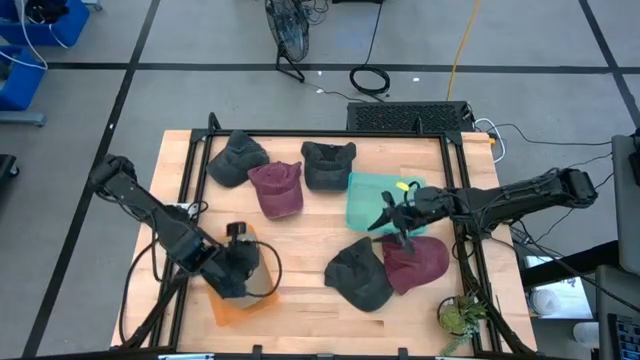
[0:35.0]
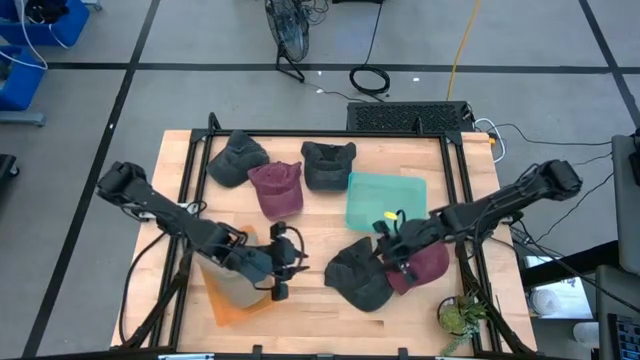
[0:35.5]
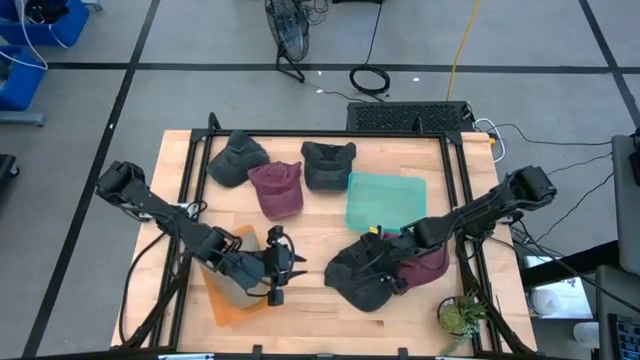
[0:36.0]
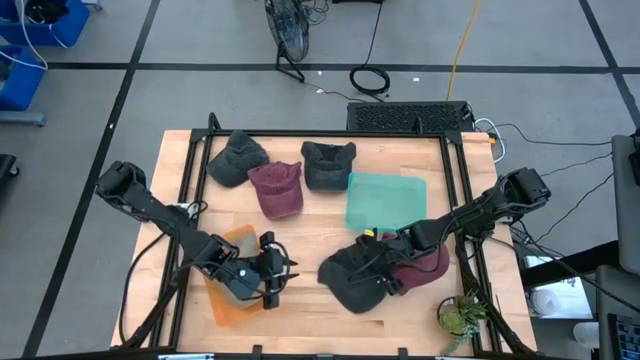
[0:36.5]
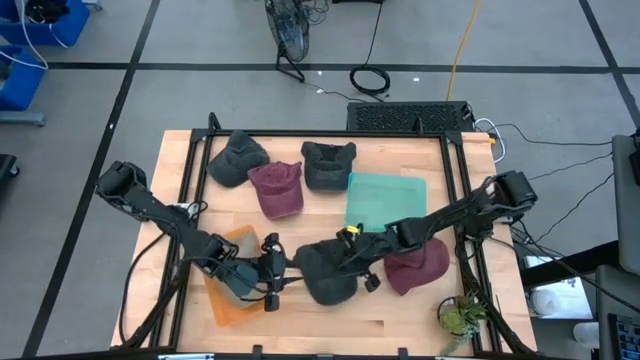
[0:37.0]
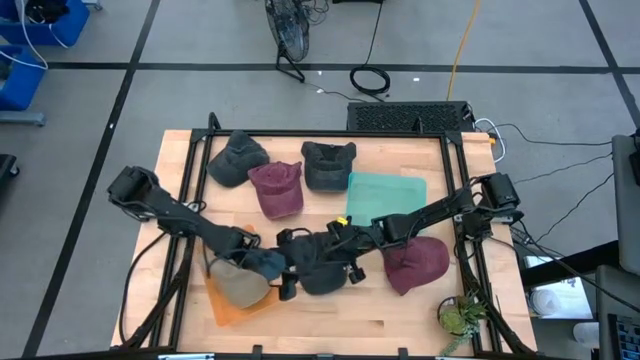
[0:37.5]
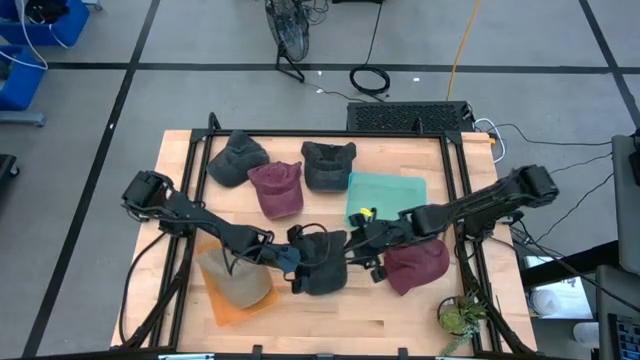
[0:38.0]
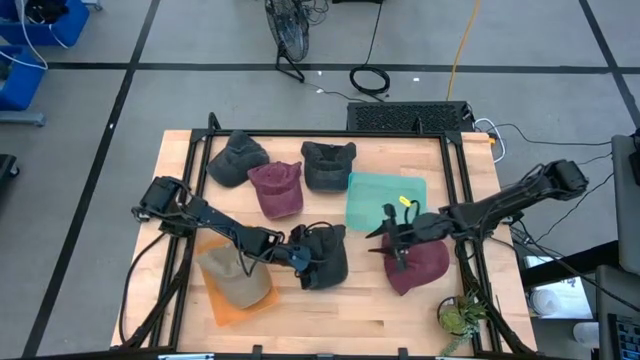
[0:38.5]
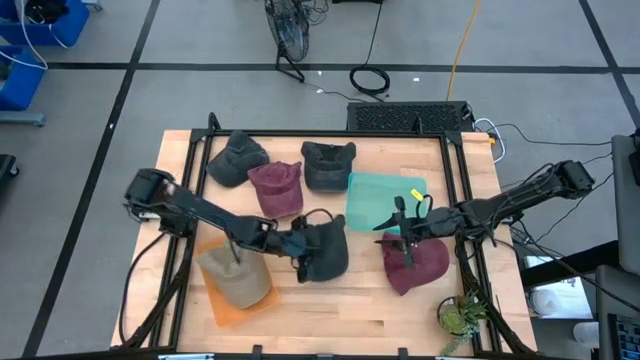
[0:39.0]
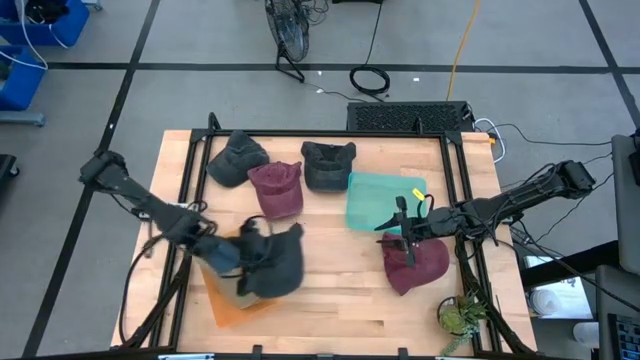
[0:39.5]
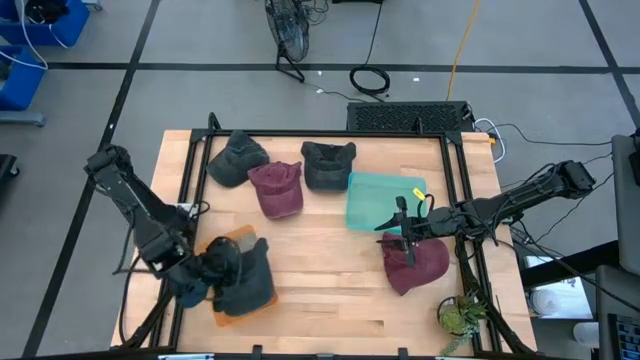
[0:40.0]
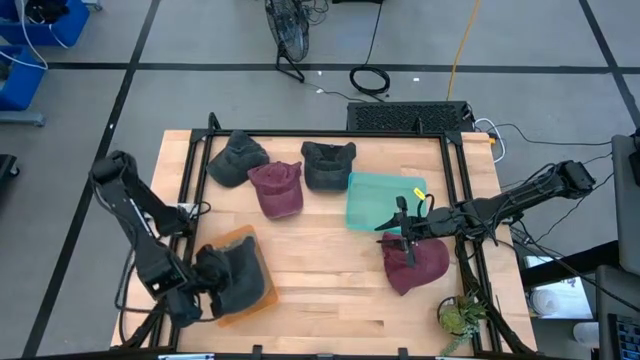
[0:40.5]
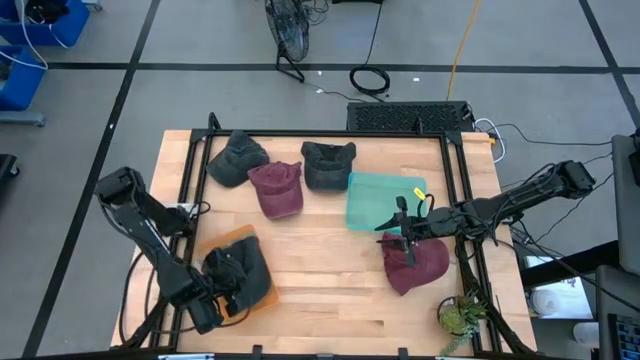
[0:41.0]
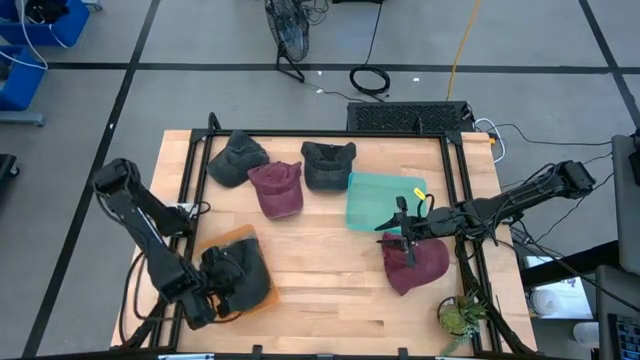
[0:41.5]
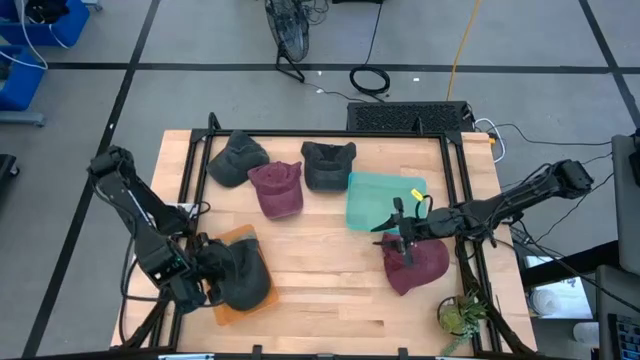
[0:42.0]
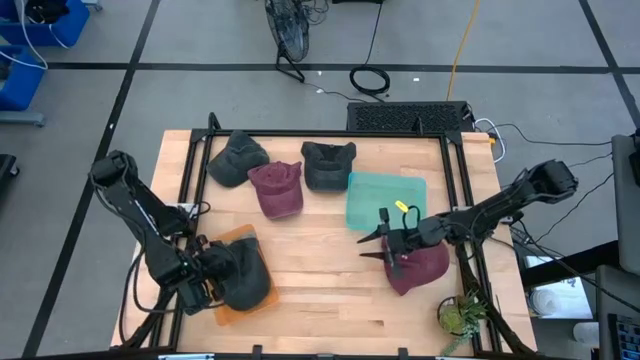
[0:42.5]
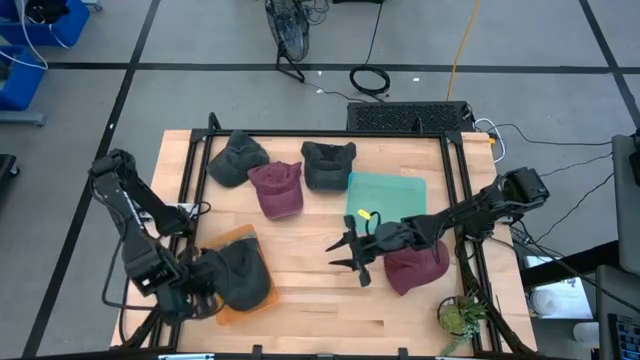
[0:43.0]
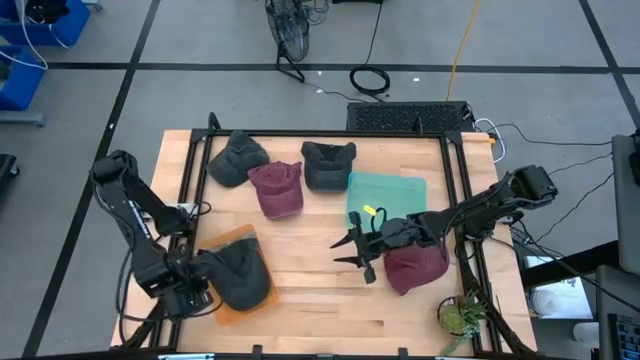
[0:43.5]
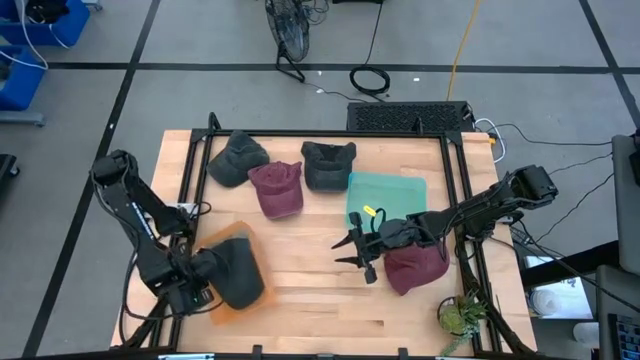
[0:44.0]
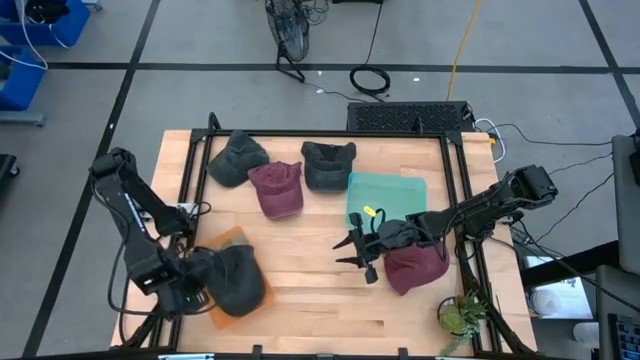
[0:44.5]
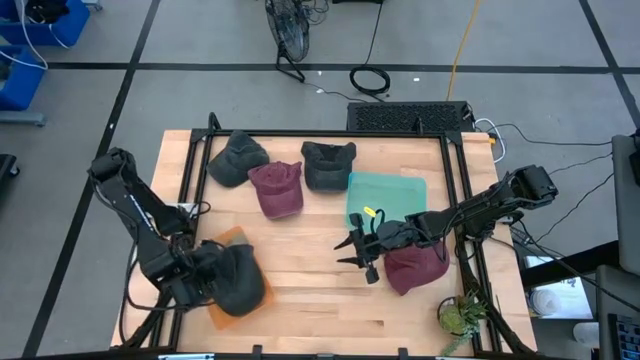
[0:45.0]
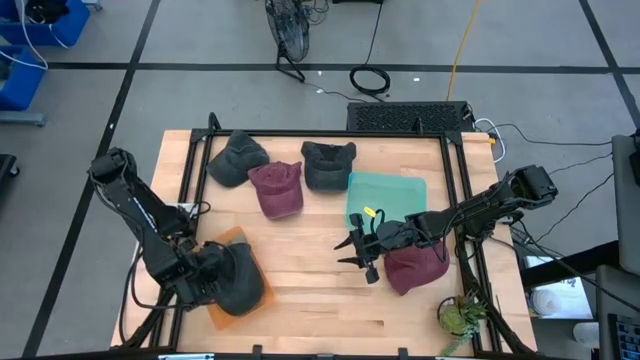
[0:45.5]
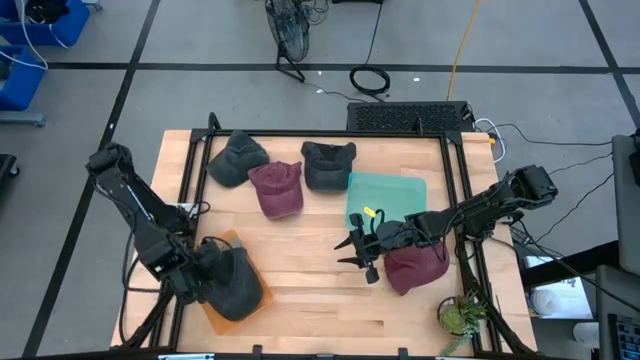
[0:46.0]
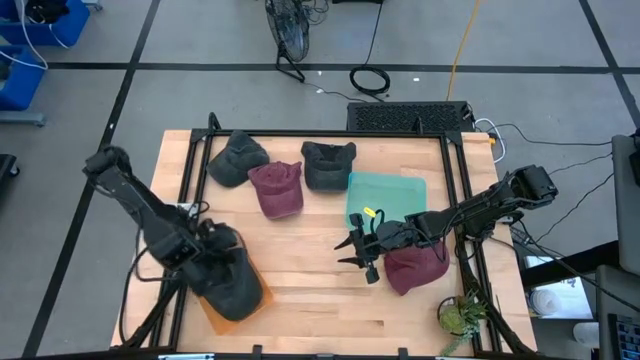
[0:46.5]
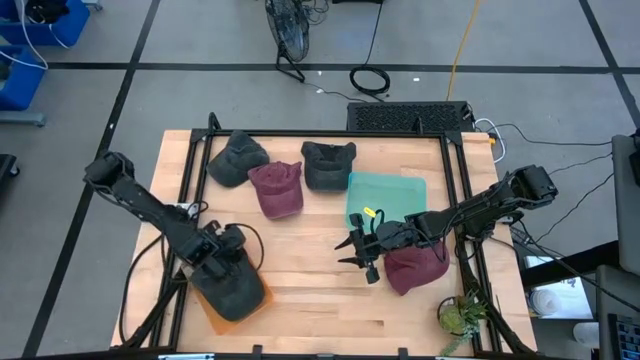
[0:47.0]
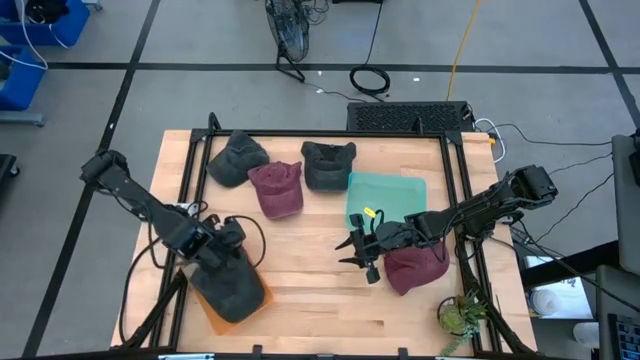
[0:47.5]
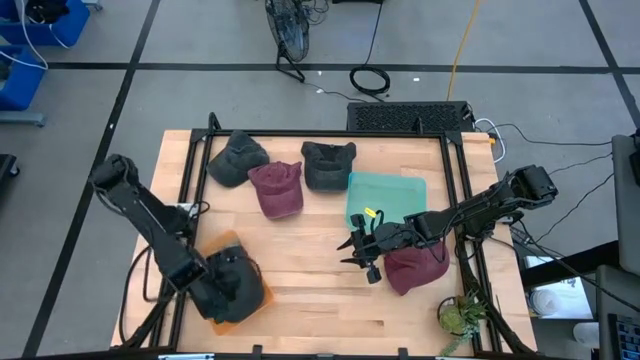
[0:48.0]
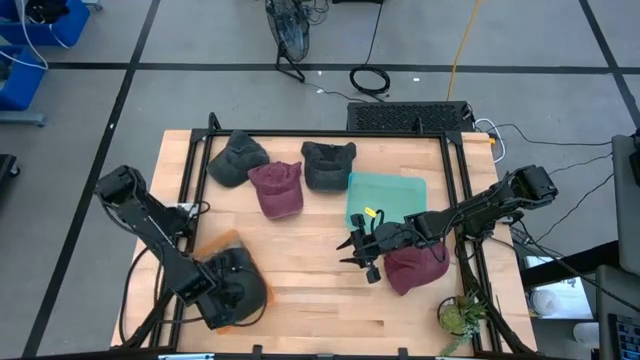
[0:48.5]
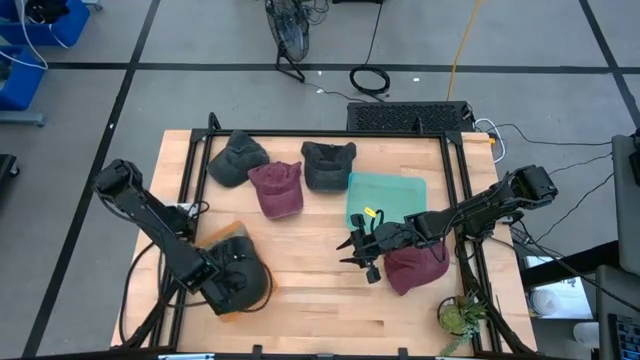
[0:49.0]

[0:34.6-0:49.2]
Task: Pick & Place hat
Put the bottom black cap into the orange bin

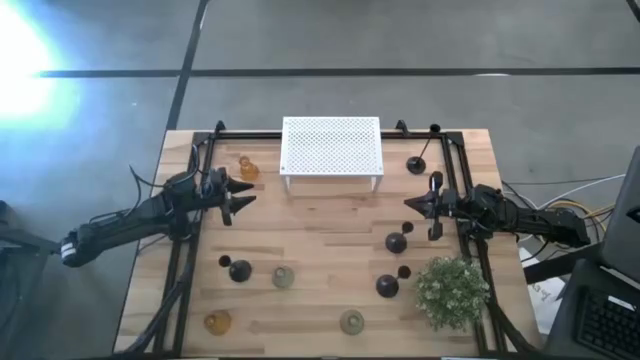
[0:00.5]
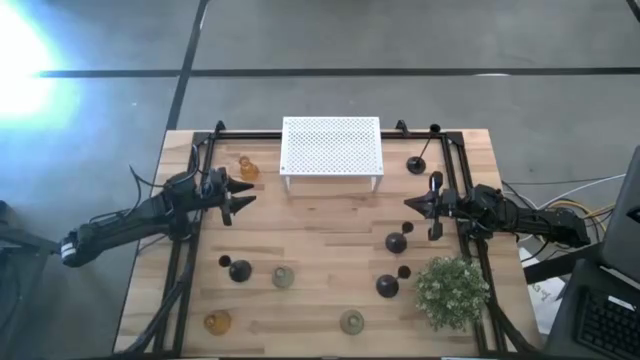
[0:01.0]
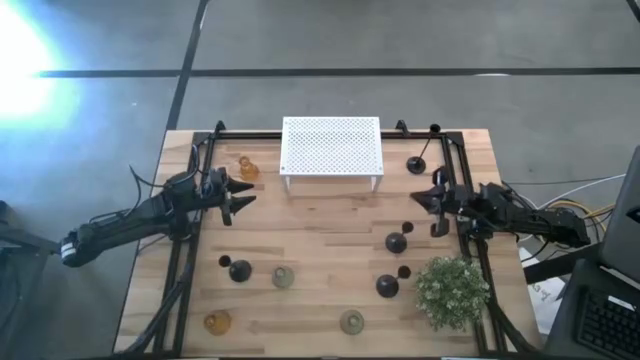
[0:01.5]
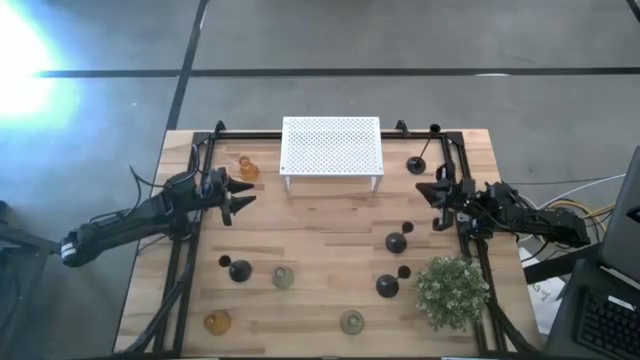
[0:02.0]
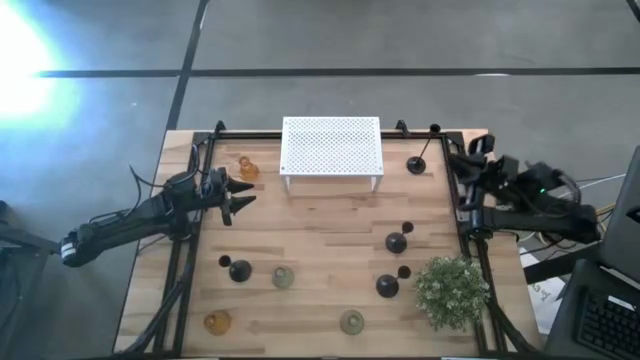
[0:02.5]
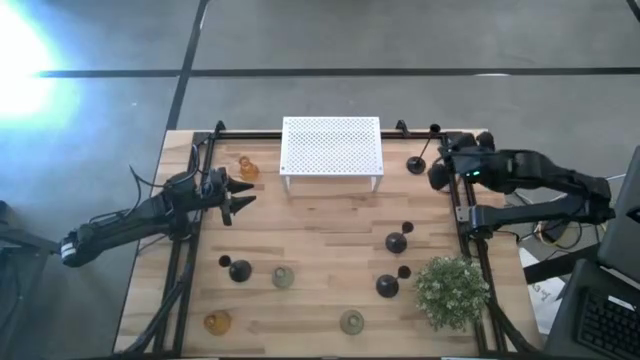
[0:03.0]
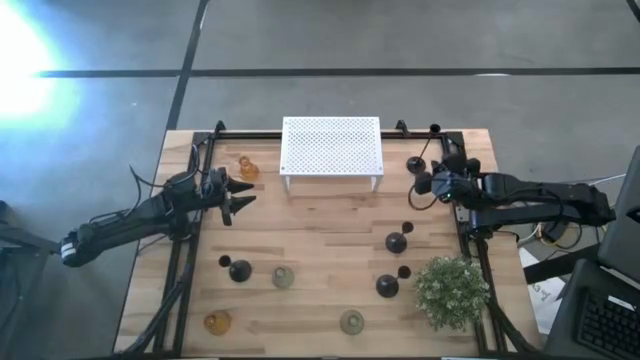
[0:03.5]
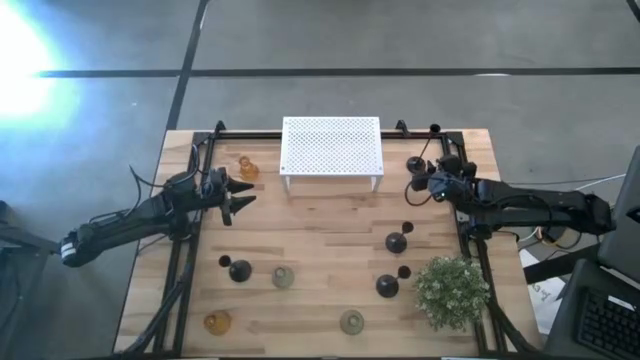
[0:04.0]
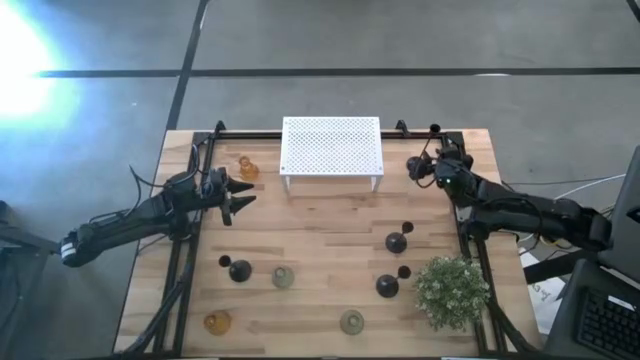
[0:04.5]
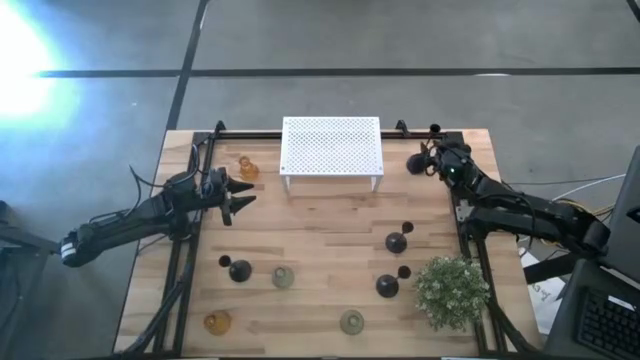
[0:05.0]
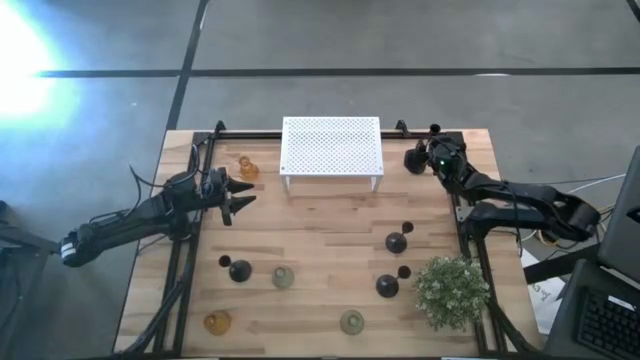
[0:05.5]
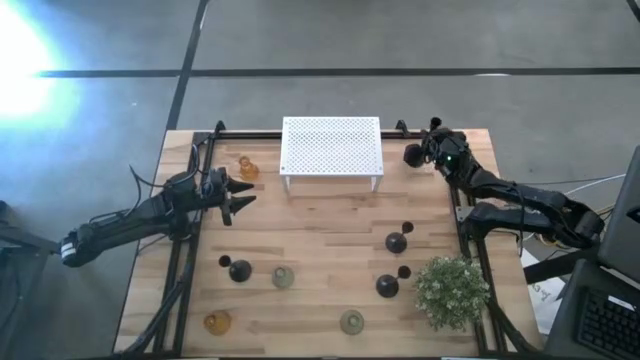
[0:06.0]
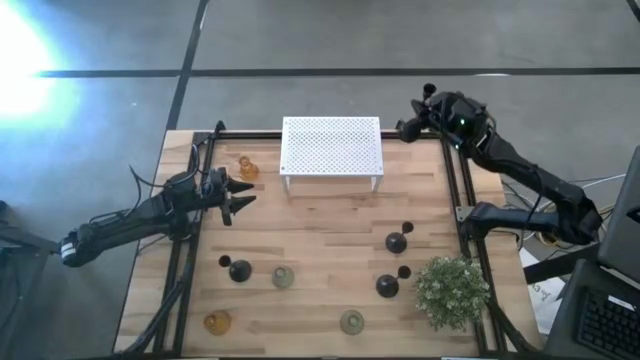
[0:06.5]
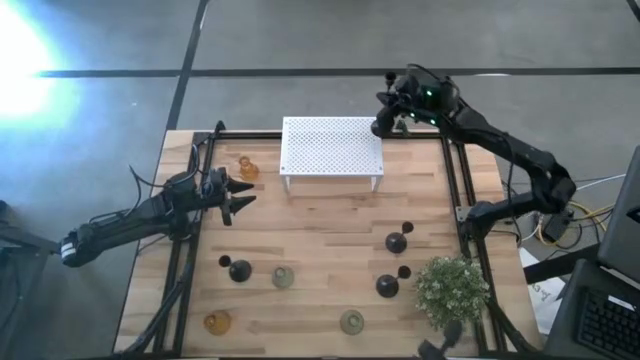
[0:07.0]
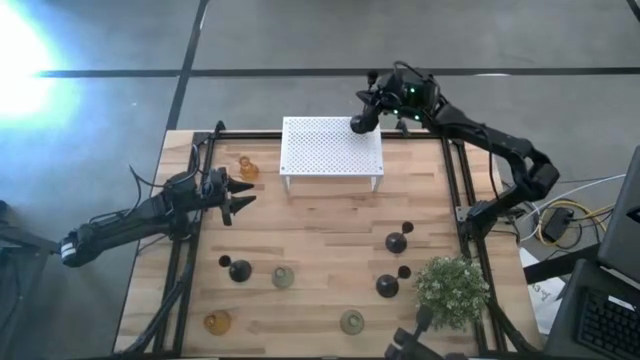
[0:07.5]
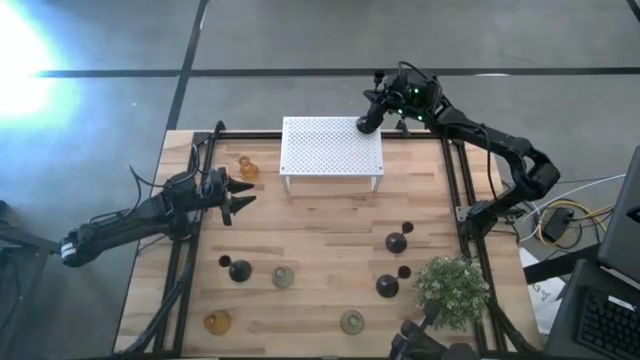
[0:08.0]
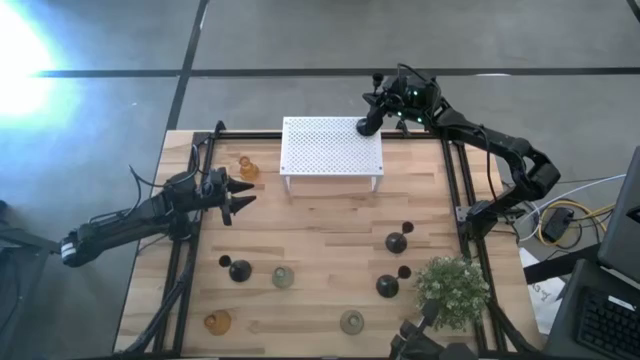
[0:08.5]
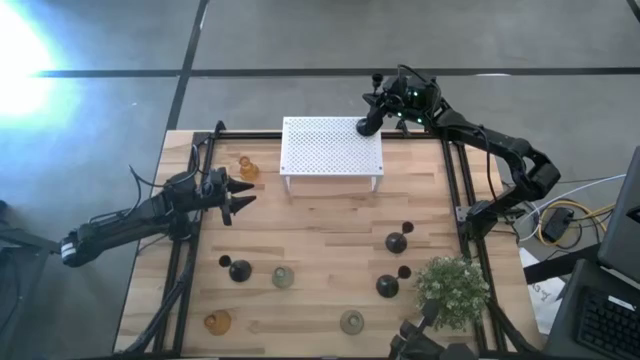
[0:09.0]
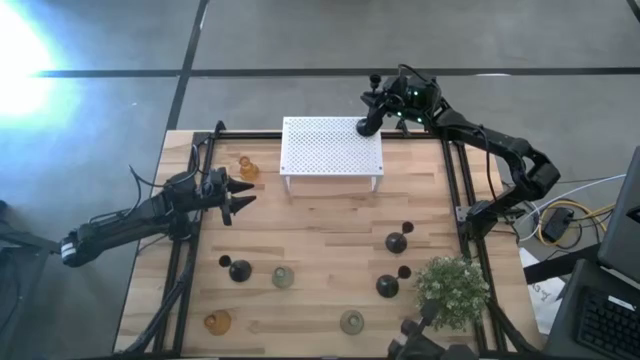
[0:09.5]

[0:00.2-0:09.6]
Task: Pick & Place candle stick holders
Put the black candle holder on the shelf
